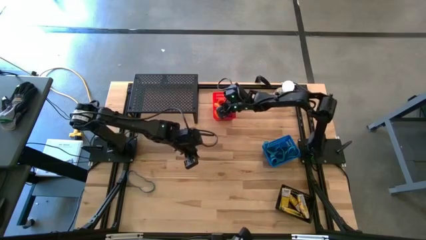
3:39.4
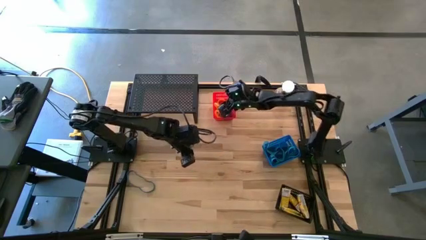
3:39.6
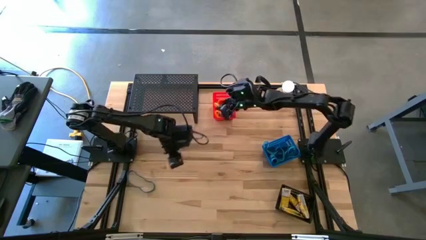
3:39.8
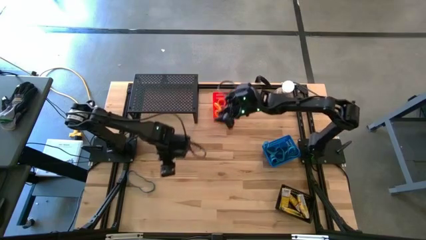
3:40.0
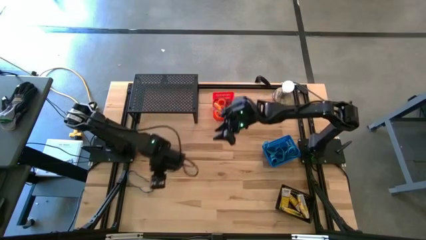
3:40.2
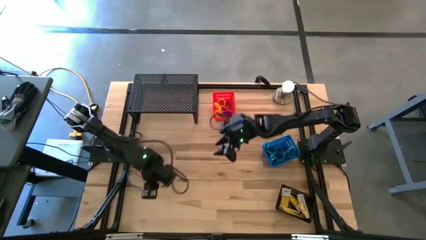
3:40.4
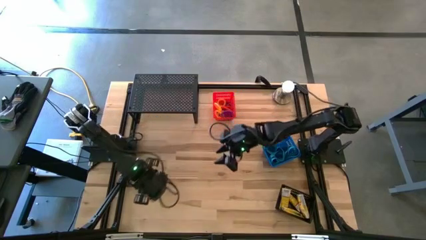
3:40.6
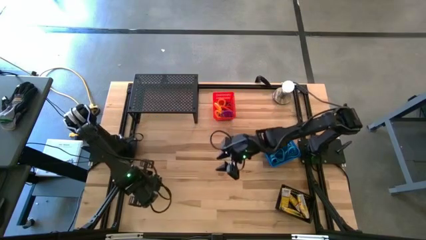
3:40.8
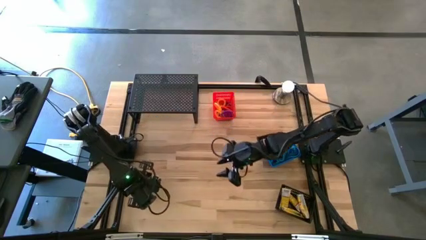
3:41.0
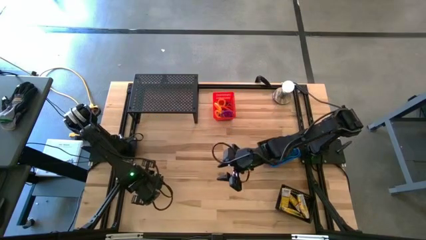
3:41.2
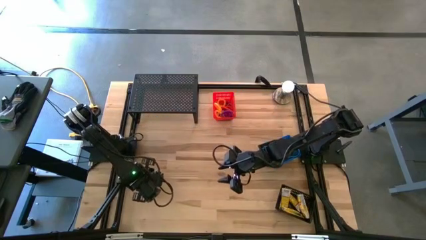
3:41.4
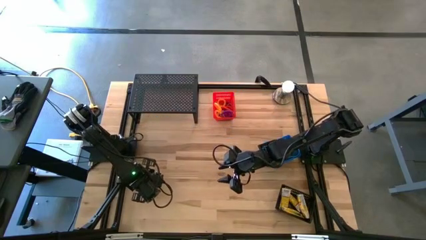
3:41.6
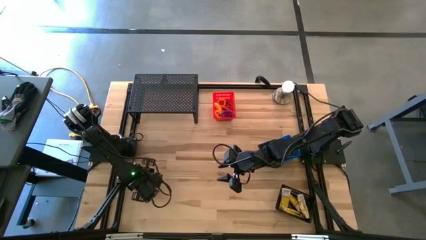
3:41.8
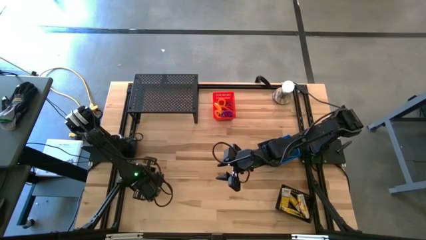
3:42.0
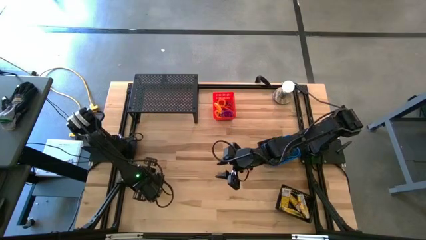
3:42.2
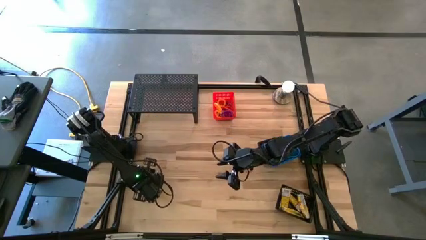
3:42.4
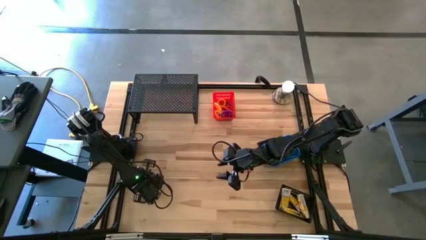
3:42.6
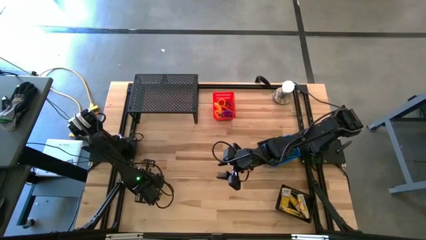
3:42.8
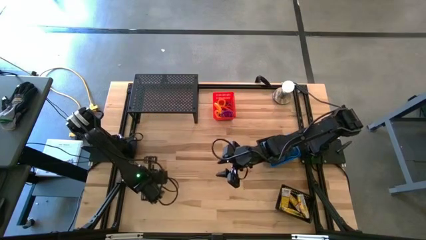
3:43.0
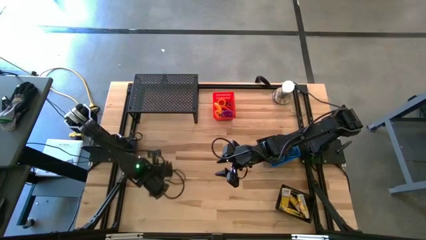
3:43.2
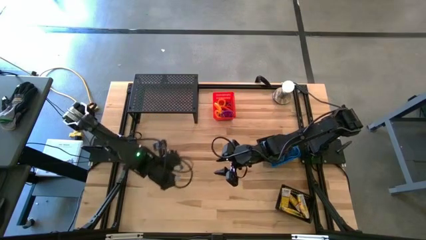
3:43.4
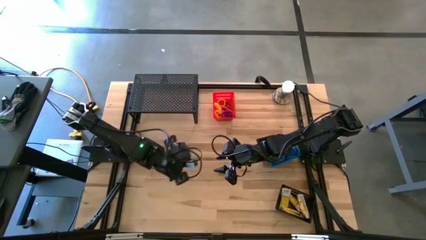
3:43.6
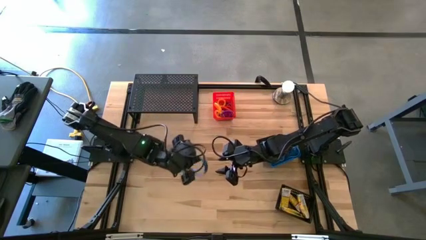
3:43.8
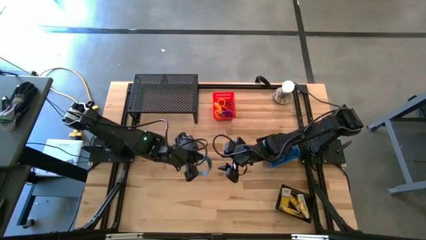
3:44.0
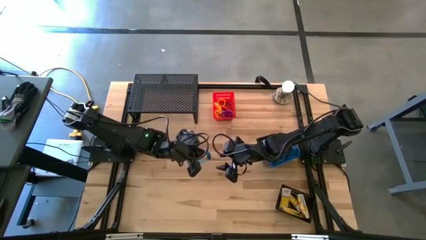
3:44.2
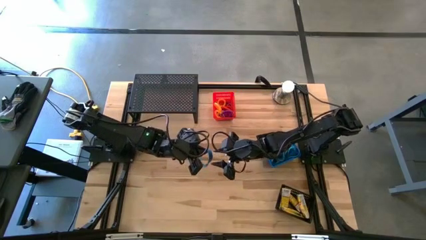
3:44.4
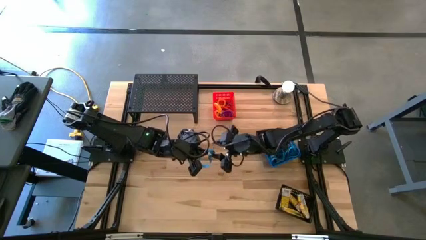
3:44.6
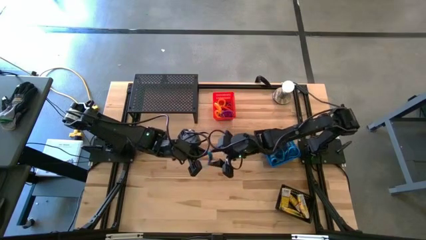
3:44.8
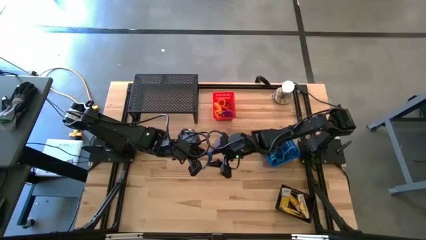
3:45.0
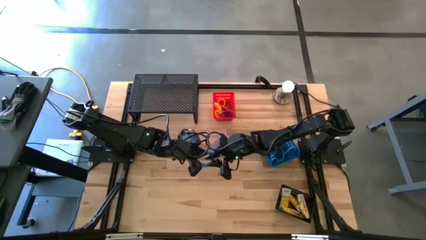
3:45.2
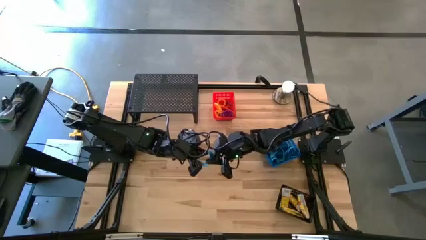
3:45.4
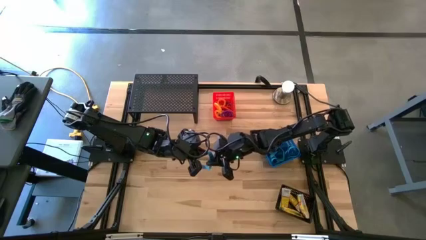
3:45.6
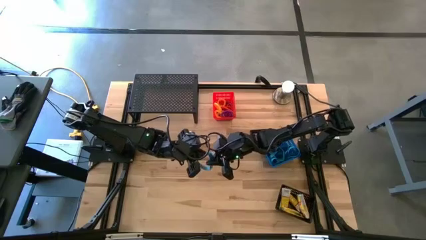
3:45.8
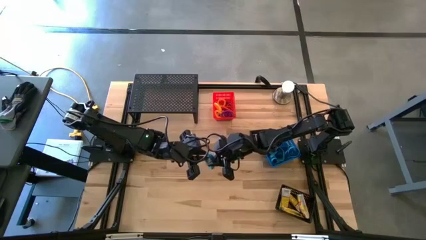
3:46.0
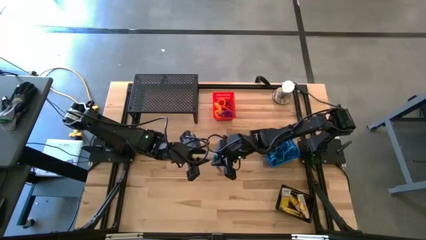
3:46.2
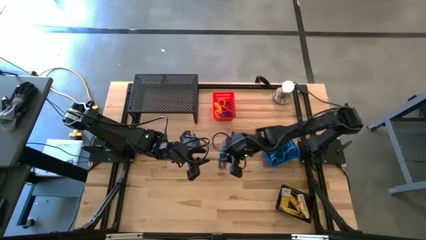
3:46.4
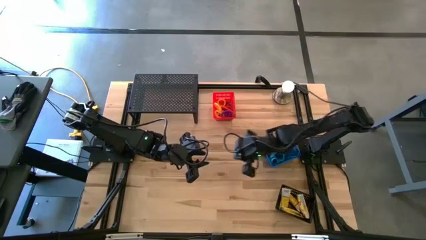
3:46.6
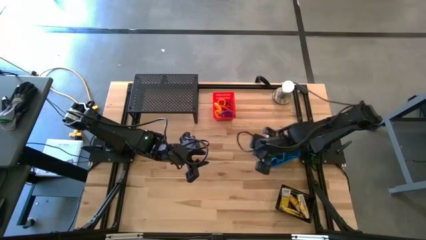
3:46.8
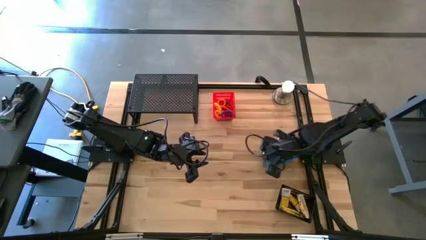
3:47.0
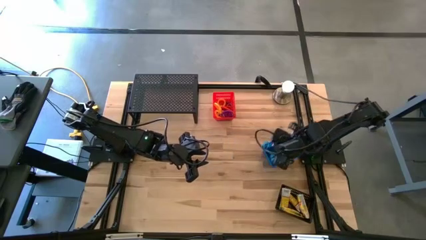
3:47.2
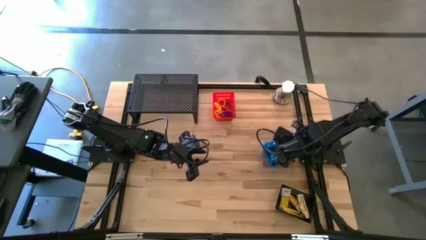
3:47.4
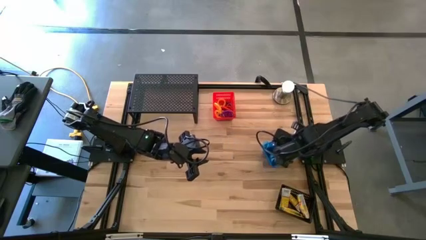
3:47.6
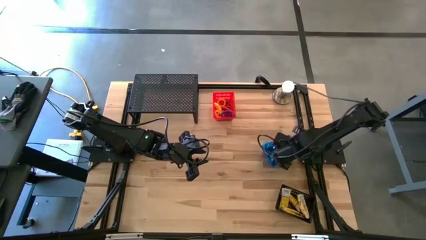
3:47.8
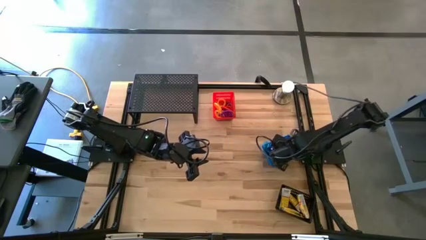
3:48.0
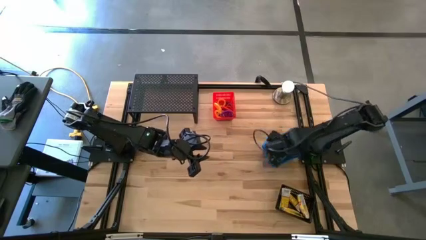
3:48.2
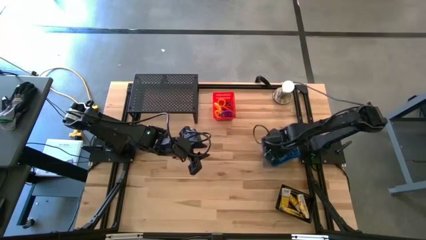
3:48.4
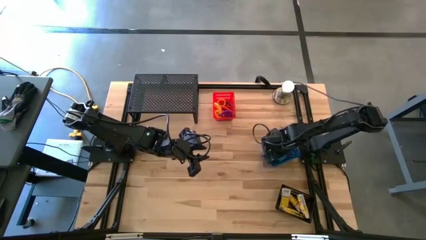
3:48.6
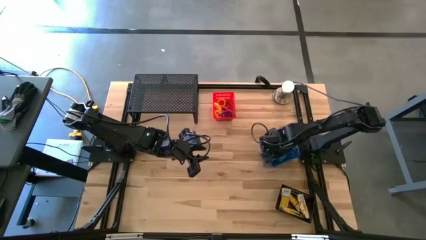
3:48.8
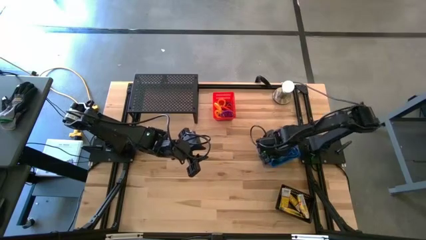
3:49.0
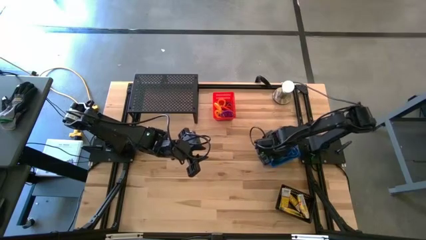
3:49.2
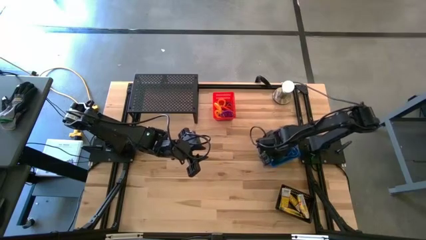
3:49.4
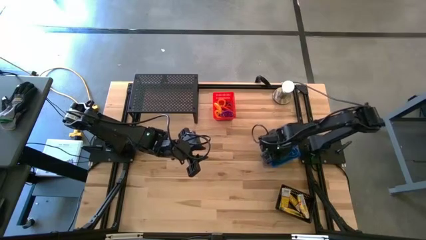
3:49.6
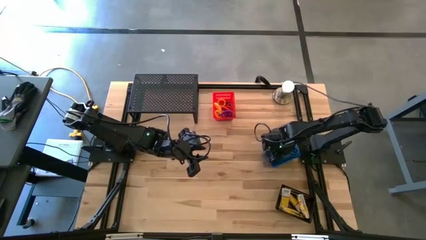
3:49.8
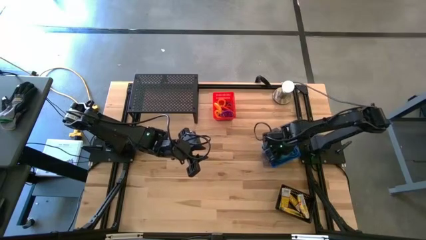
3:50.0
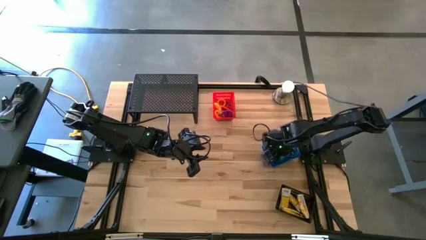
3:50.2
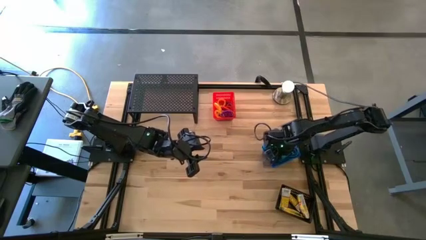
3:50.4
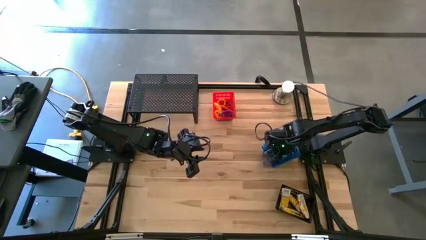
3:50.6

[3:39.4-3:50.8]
Task: Pick & Place Office Desk Supplies
Put the blue rubber band into the blue bin

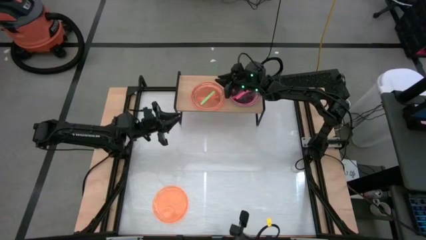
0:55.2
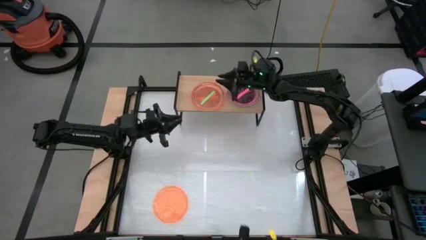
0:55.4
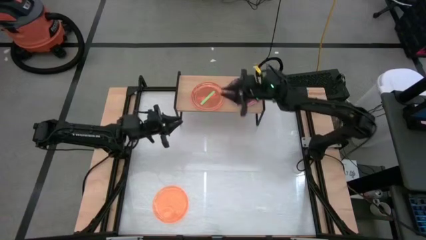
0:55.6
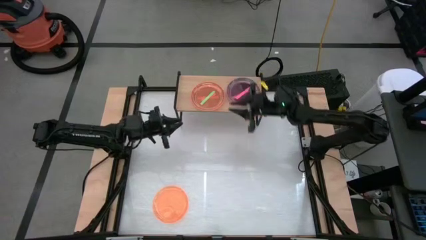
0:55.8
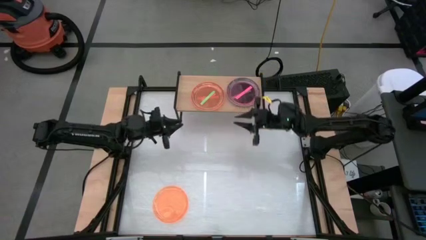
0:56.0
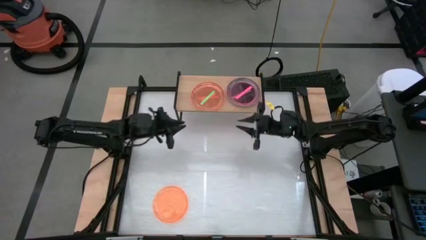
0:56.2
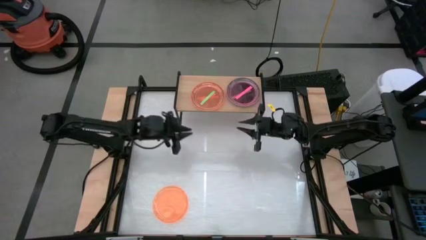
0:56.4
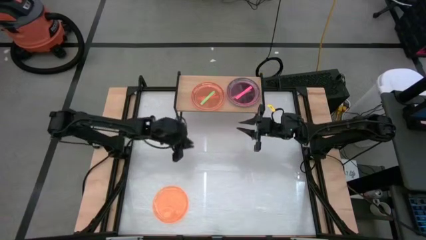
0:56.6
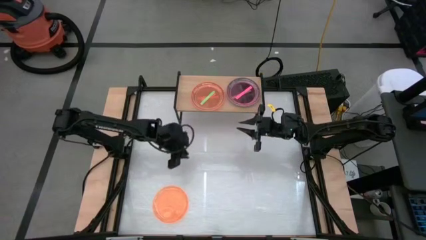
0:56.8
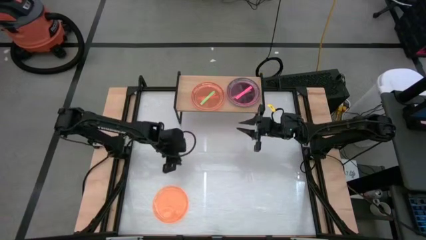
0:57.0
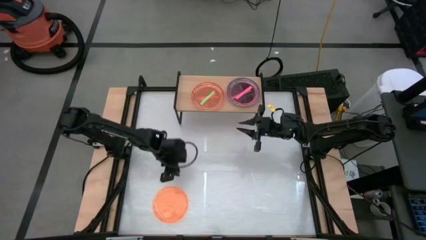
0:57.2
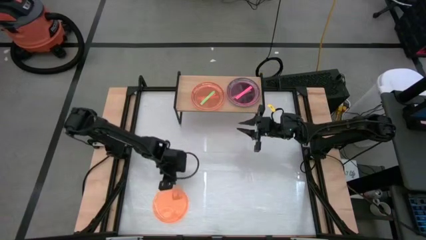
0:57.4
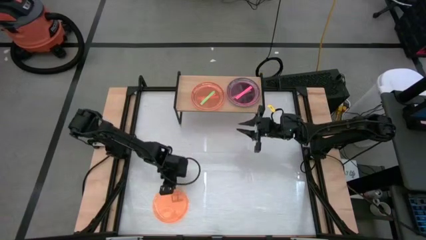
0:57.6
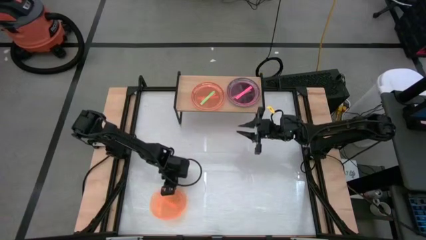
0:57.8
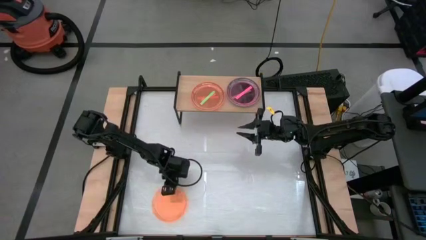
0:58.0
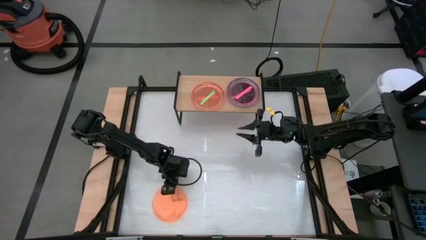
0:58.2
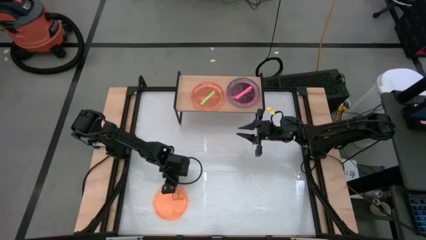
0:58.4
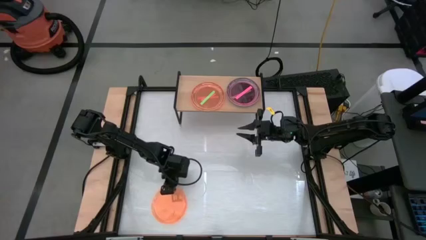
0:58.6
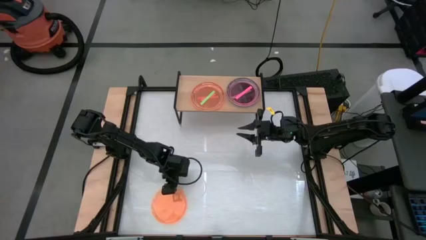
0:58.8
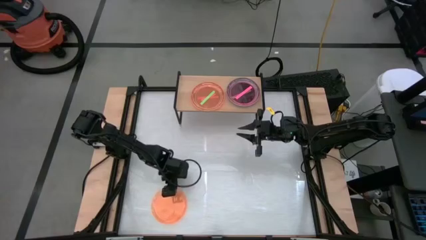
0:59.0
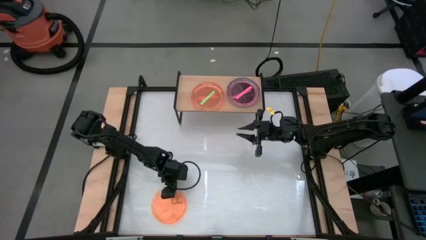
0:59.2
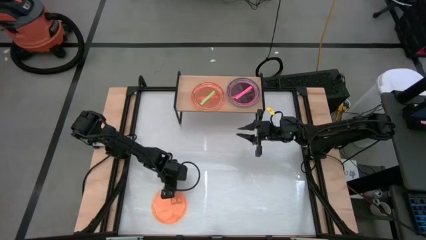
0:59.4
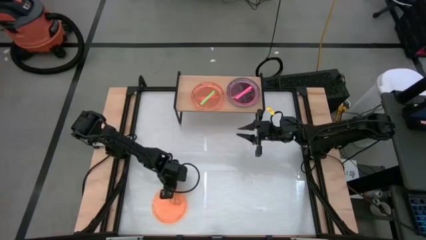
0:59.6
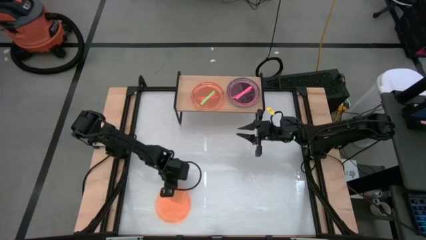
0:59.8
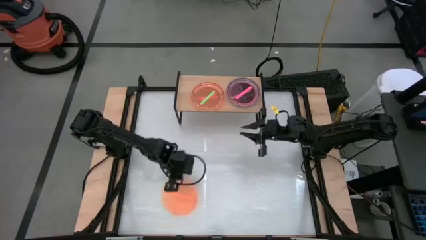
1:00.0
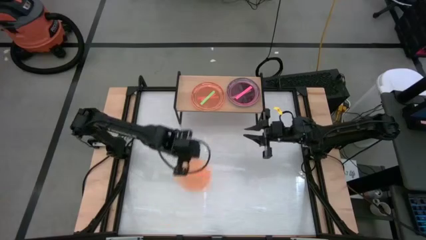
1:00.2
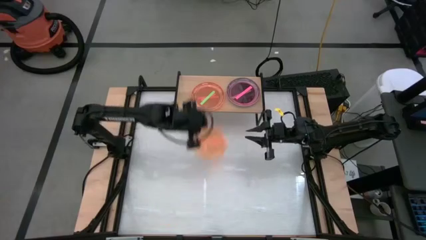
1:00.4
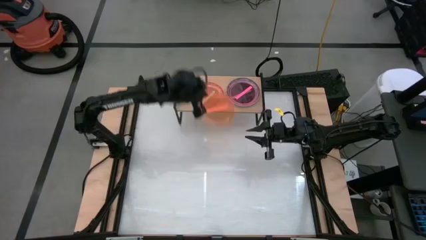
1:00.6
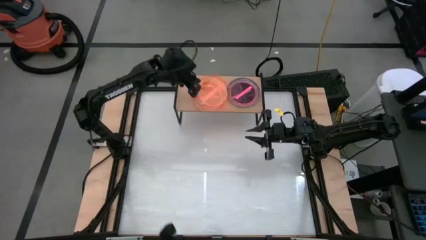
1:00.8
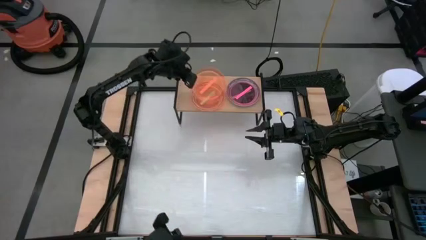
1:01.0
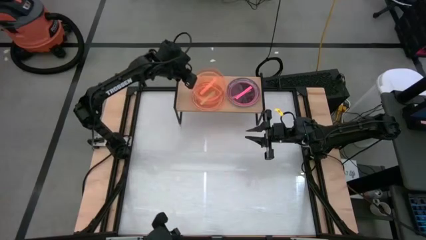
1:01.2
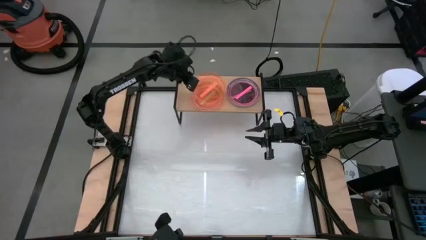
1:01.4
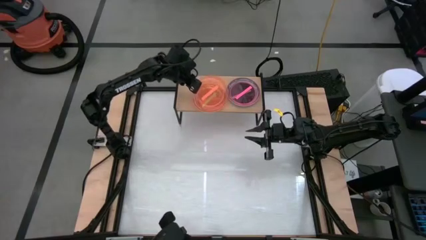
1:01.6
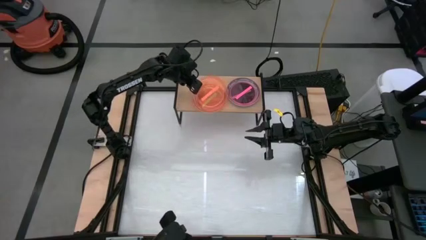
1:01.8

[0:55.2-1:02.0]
Task: Place and stack plates onto a shelf
Stack the orange plate on the green plate on the shelf
